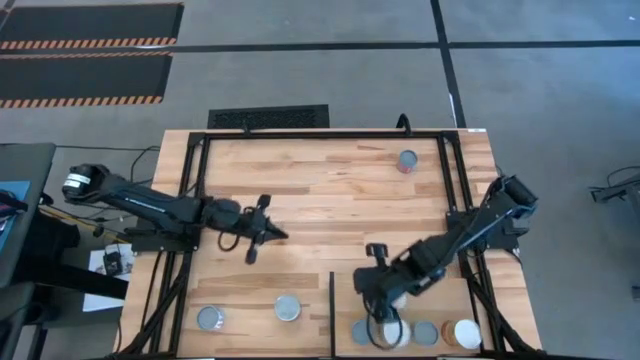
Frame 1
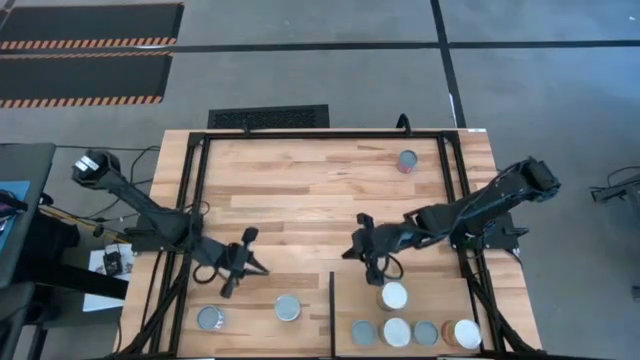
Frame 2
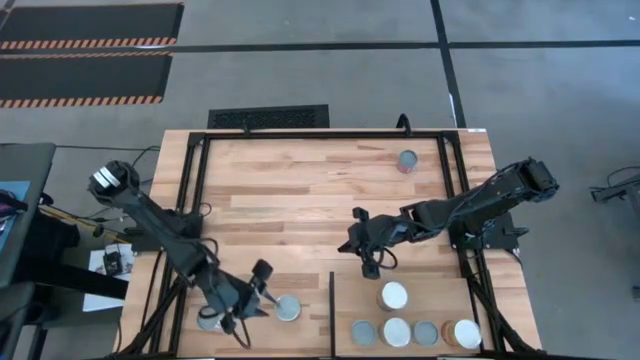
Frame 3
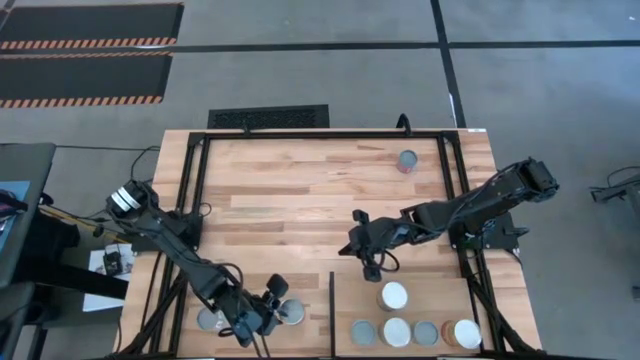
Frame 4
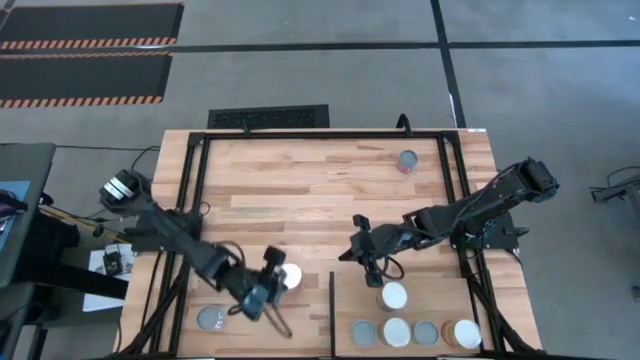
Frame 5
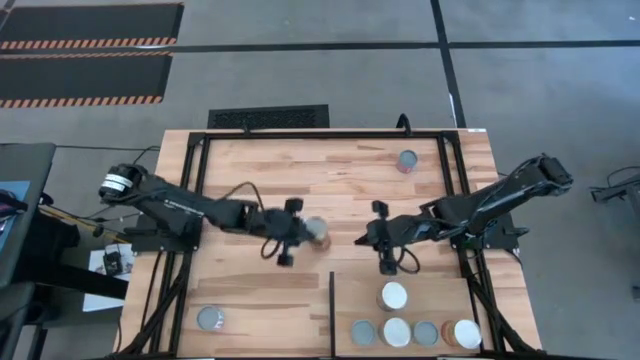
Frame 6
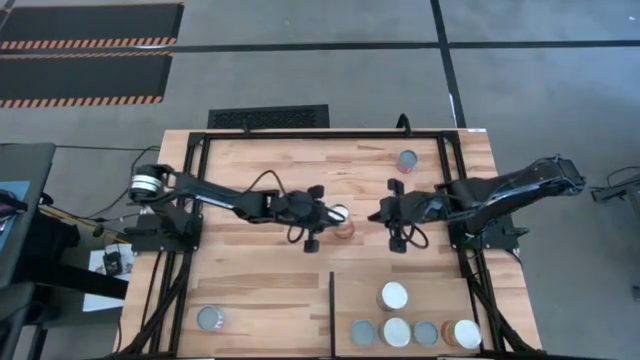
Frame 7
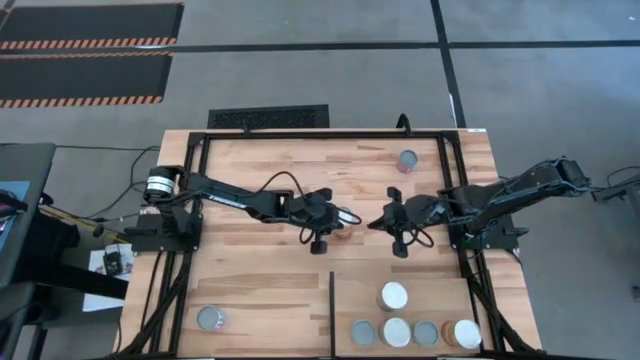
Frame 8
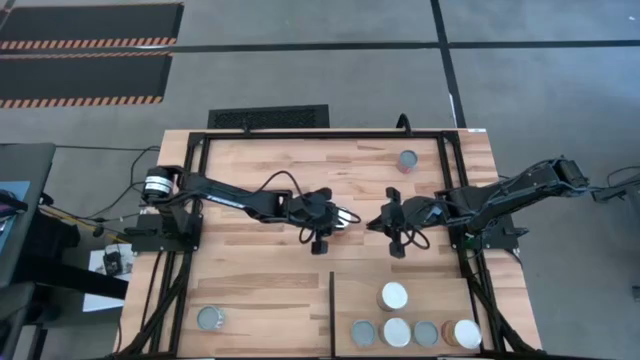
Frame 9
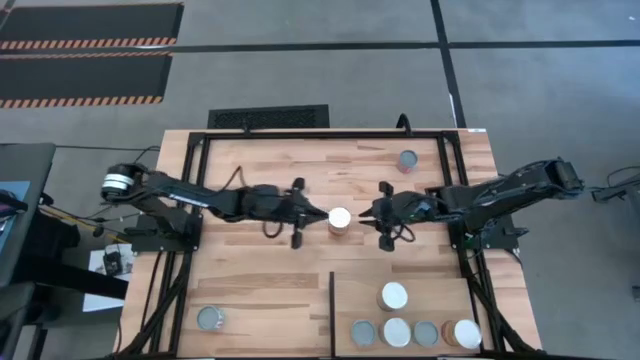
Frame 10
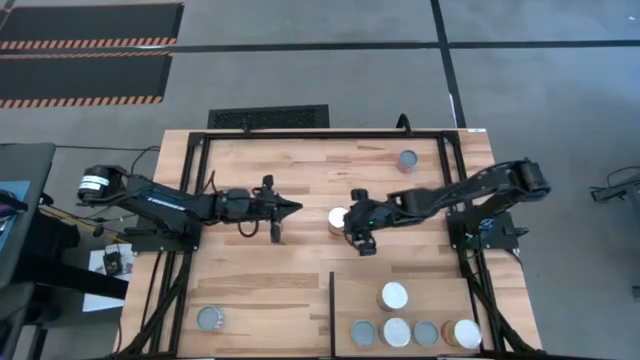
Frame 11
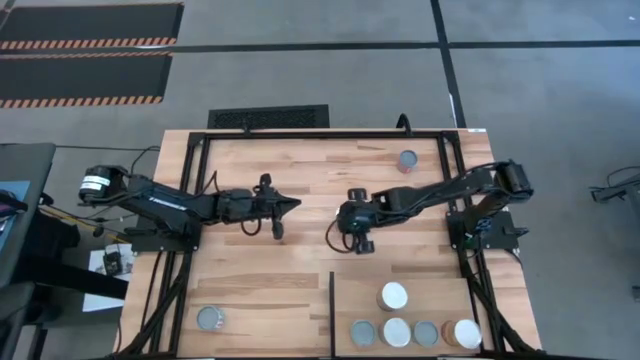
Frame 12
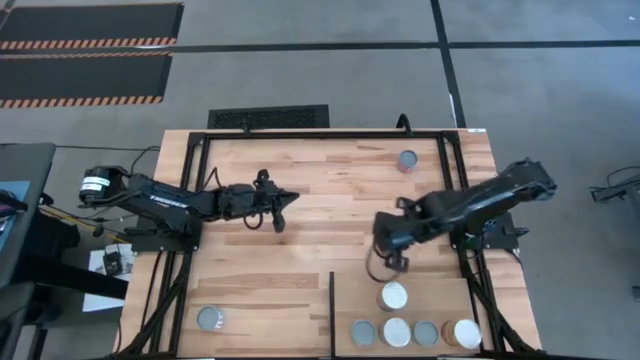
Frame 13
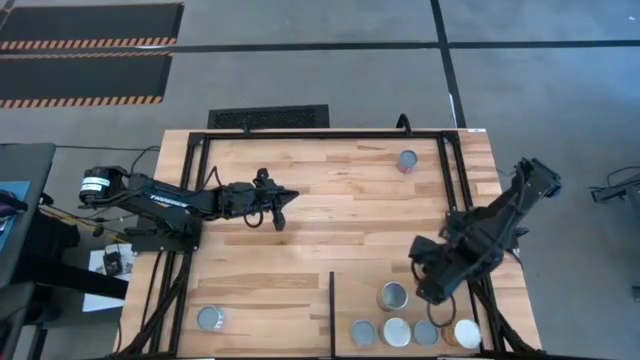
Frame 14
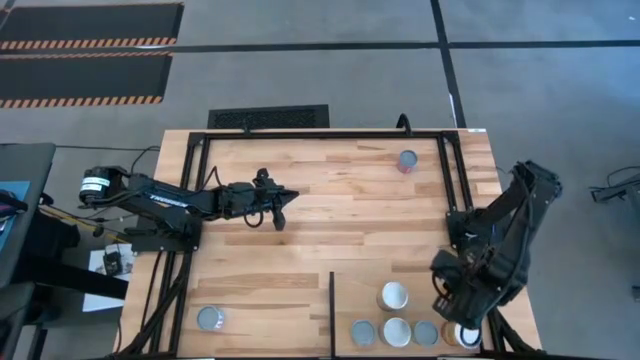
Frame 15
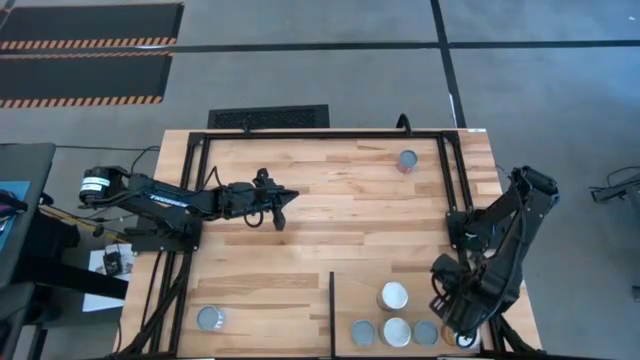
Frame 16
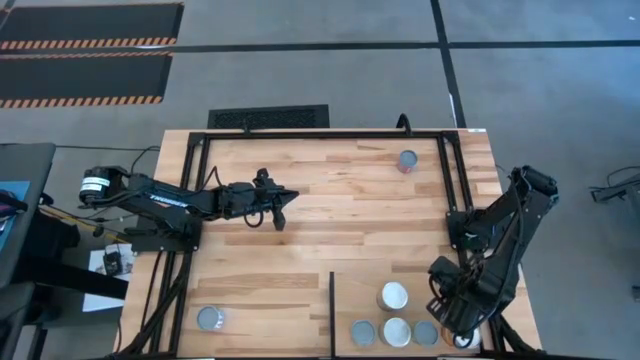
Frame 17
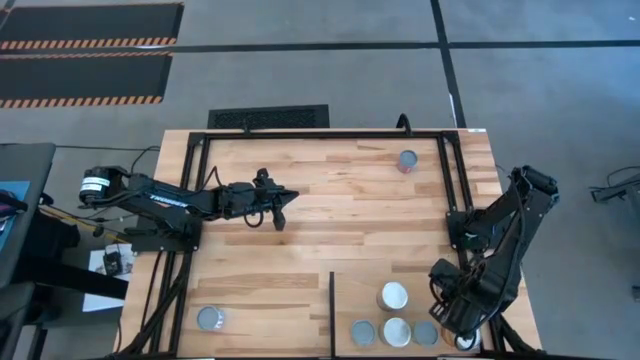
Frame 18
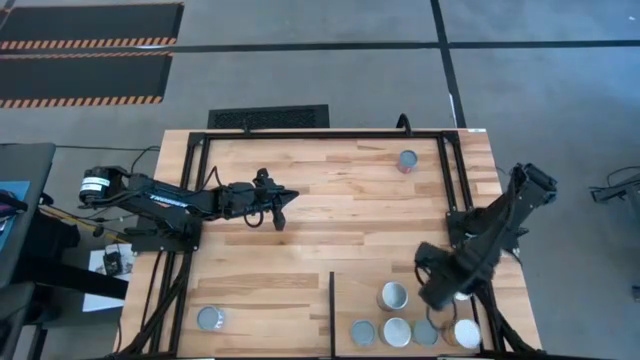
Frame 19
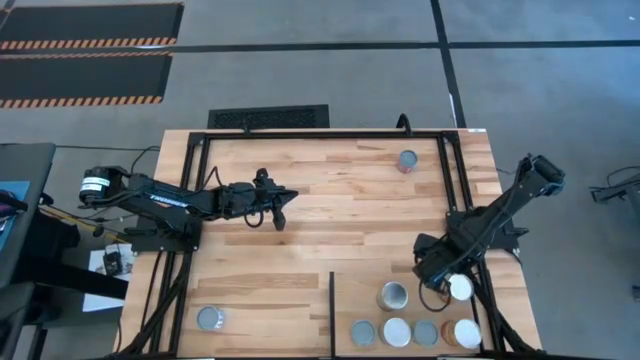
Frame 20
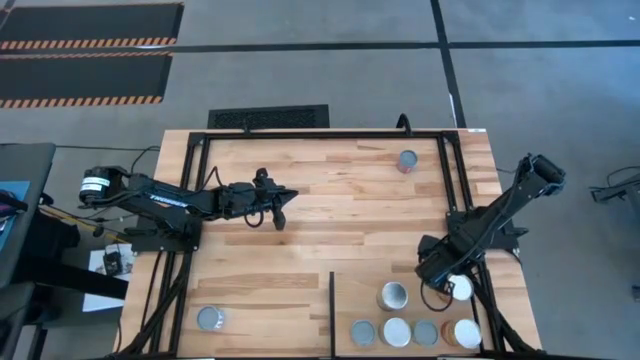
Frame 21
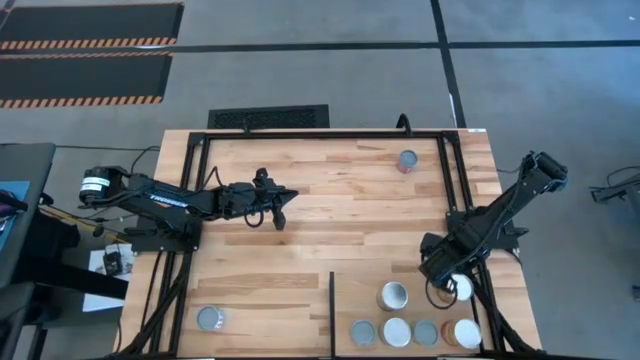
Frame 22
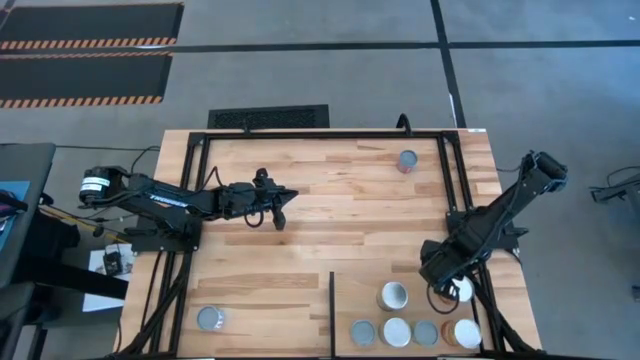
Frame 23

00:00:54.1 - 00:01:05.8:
Task: Pick and place cans onto a shelf
Put the canned corns aligned with the other canned corns on the shelf

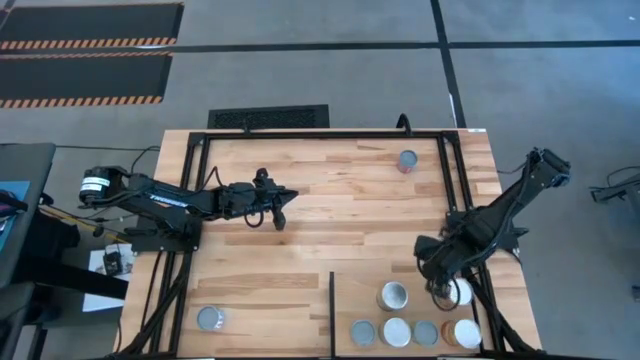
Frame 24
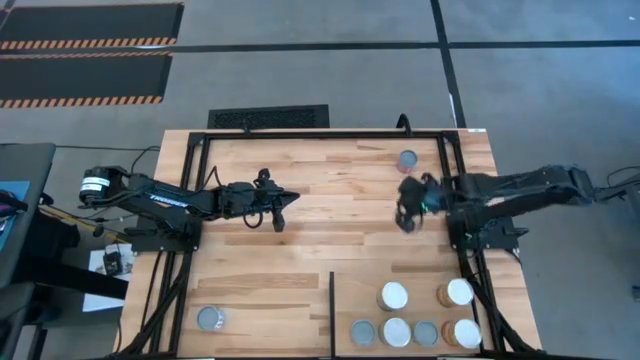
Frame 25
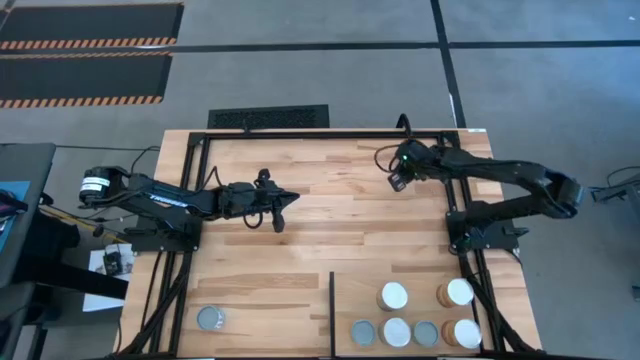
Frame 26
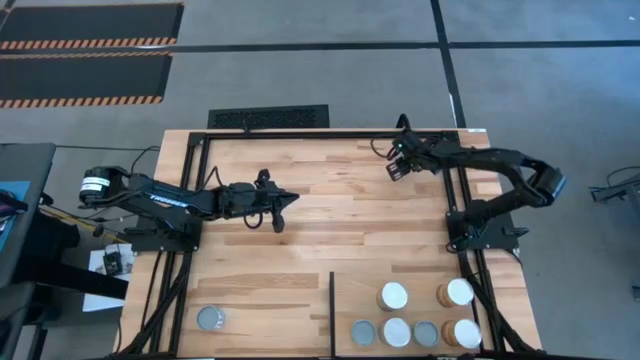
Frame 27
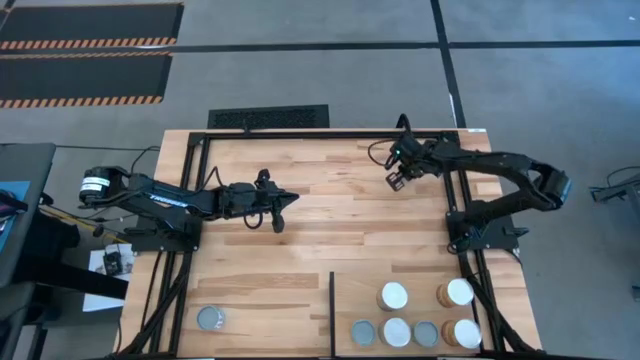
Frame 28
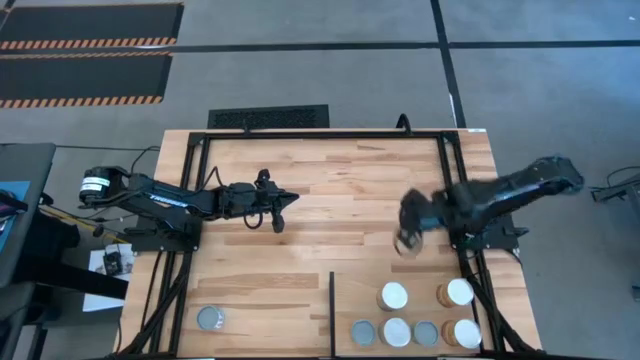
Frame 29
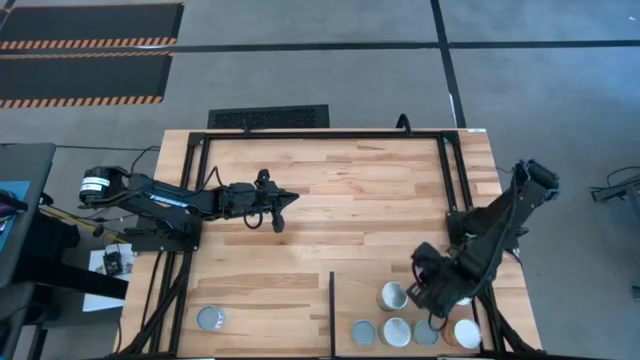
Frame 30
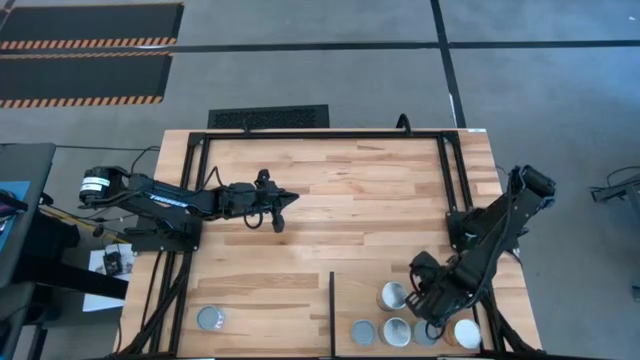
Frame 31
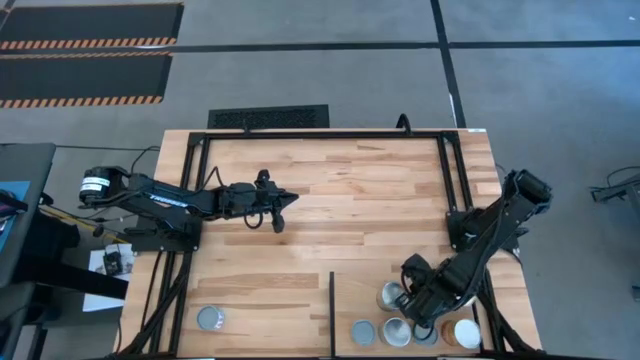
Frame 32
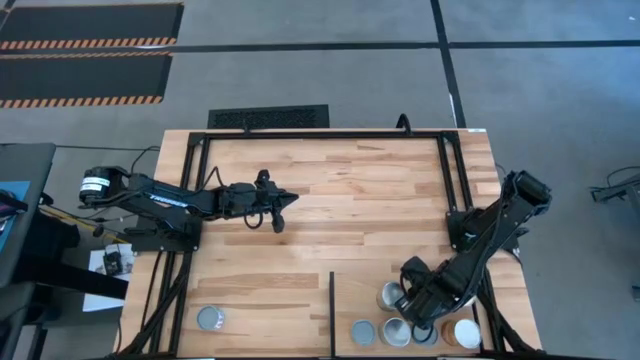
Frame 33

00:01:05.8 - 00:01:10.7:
Put the canned mixed corns on the shelf

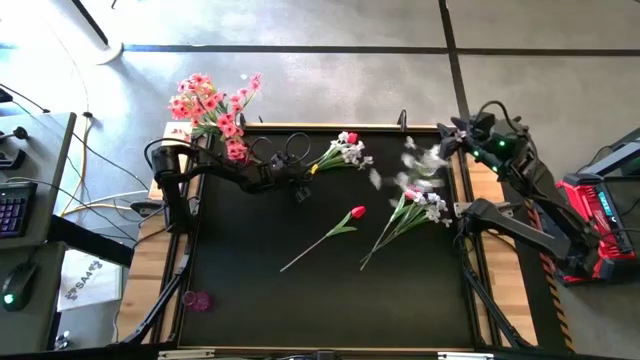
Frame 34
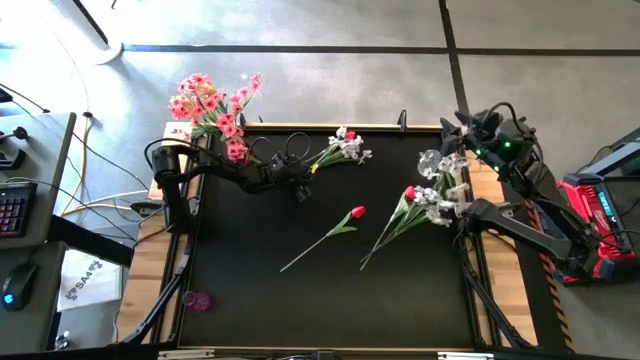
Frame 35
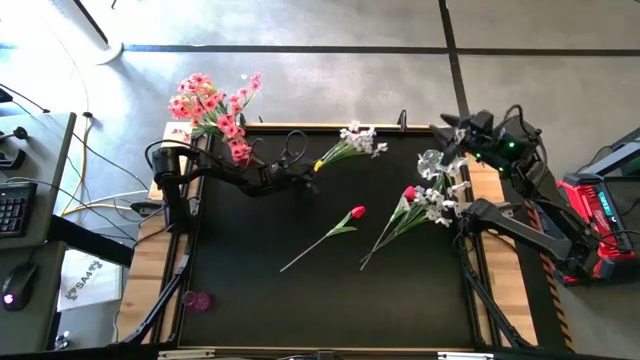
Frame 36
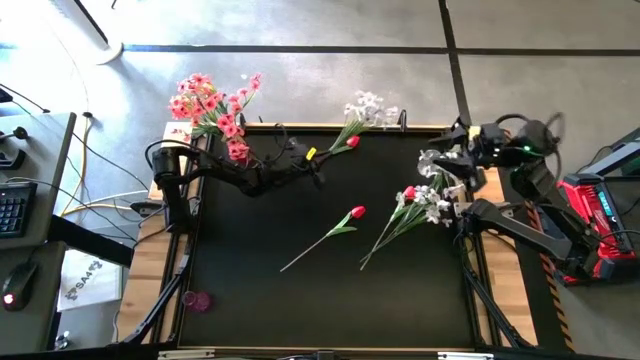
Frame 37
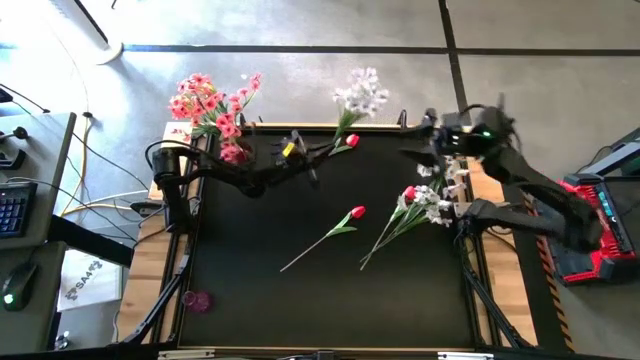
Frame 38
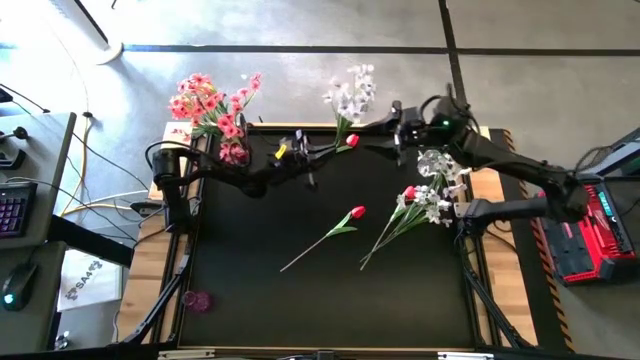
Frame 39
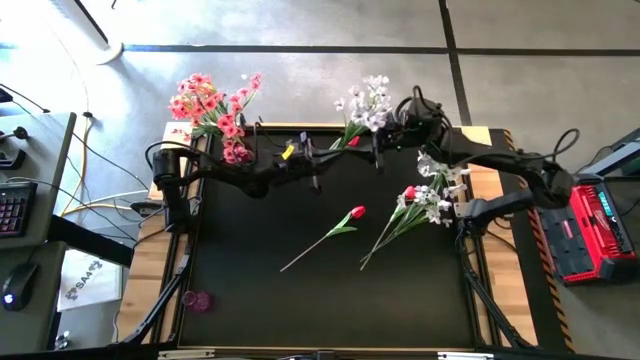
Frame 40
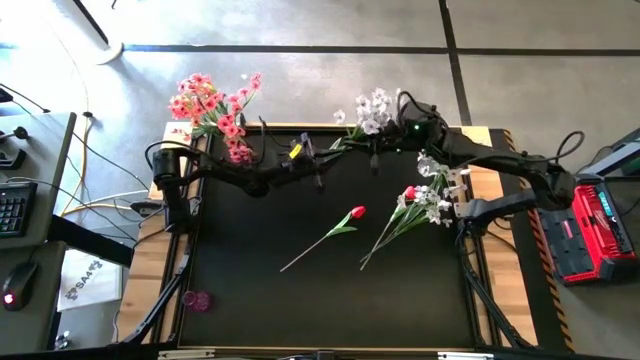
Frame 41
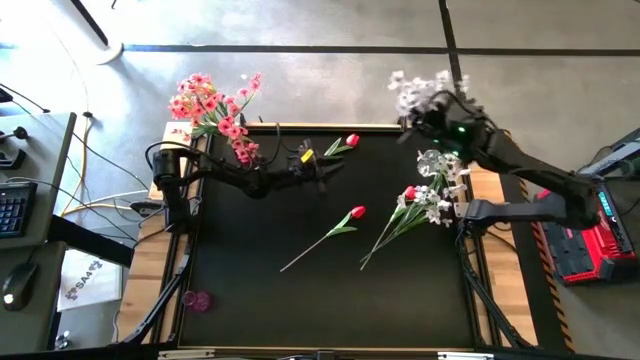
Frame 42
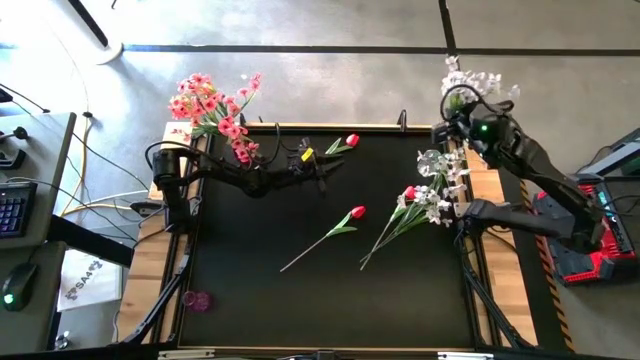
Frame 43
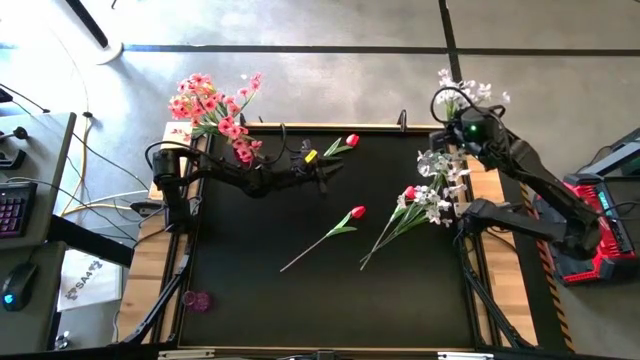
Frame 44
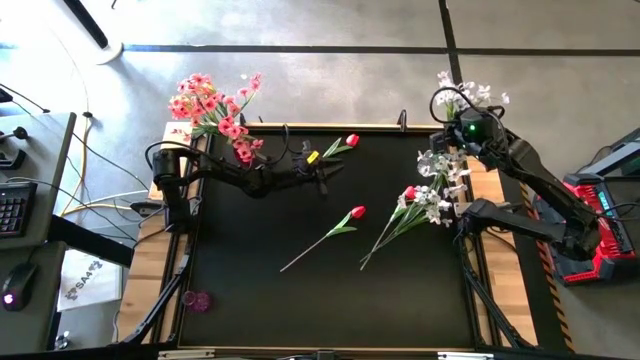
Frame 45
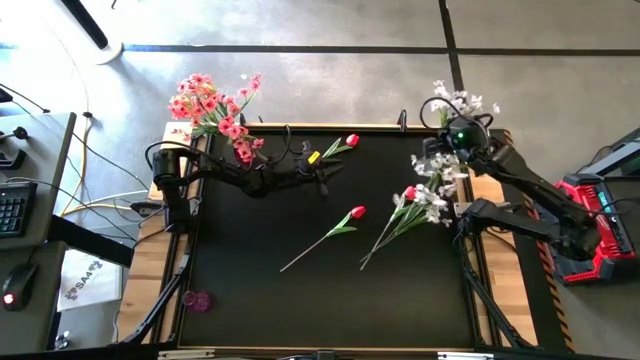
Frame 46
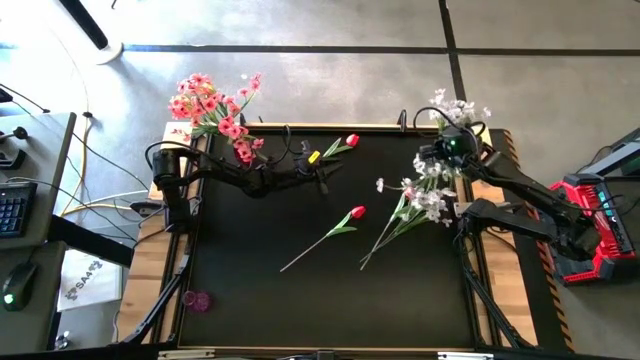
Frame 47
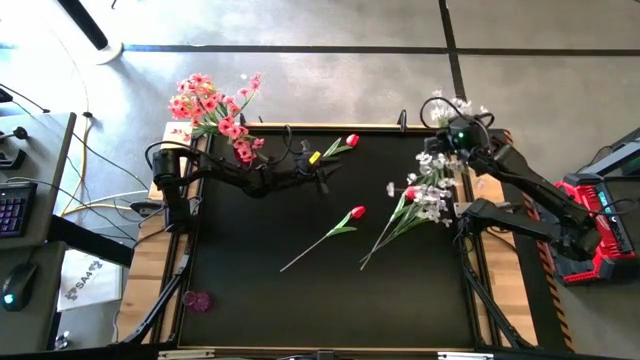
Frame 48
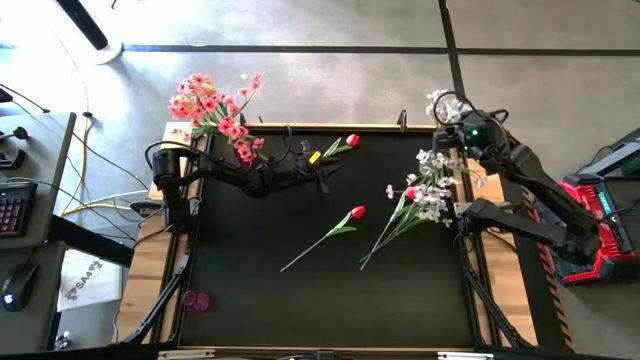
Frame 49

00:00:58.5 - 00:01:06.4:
Task: Sort flowers into vase by color
Put the top white flower into the transparent vase
